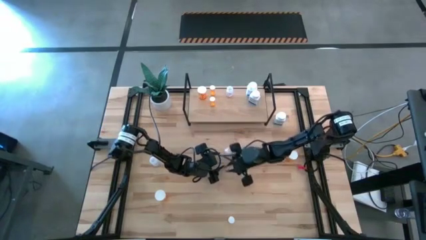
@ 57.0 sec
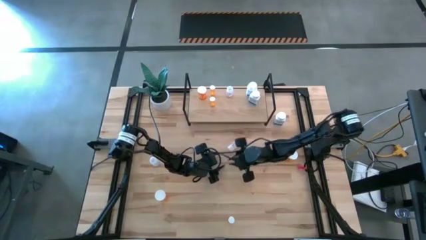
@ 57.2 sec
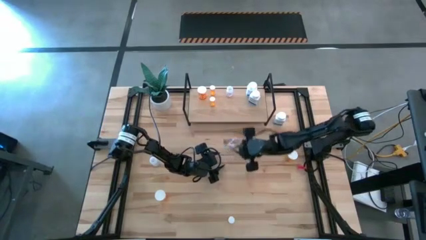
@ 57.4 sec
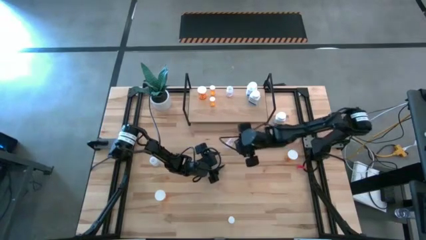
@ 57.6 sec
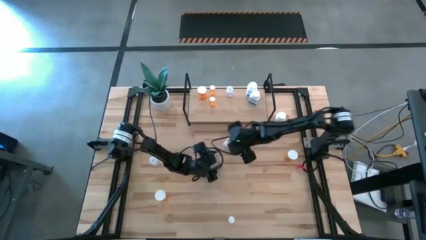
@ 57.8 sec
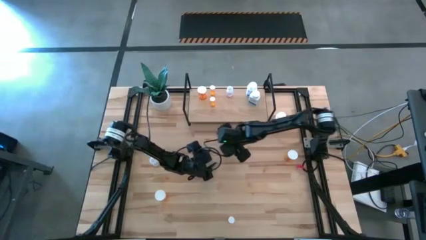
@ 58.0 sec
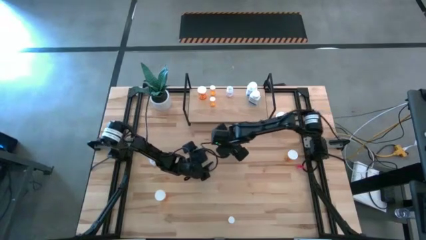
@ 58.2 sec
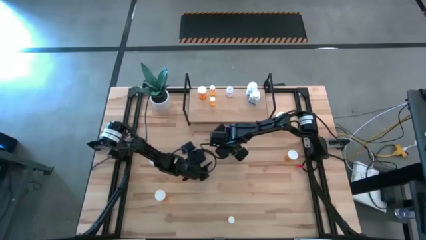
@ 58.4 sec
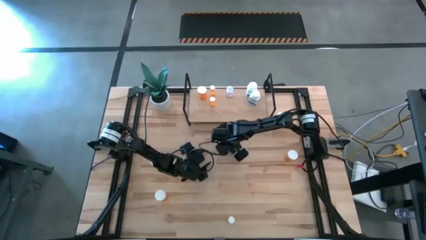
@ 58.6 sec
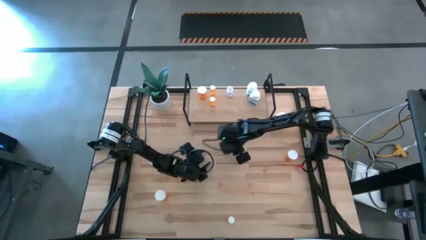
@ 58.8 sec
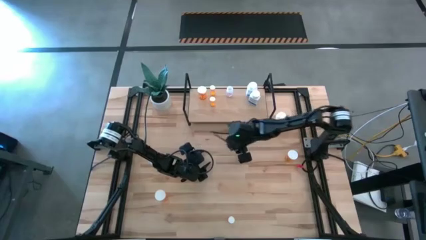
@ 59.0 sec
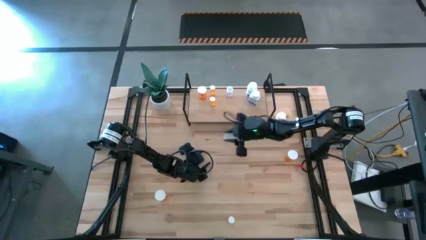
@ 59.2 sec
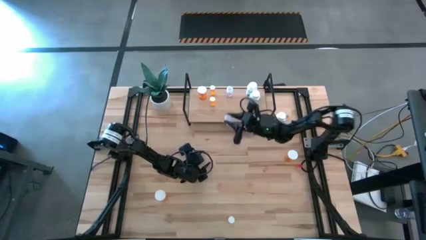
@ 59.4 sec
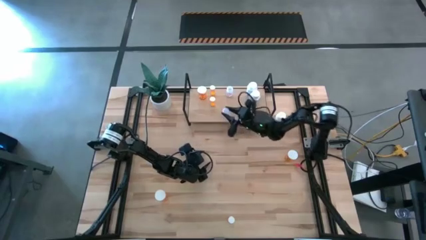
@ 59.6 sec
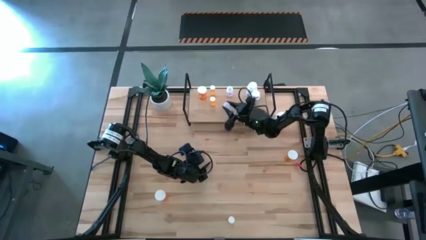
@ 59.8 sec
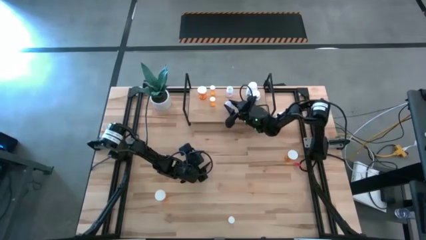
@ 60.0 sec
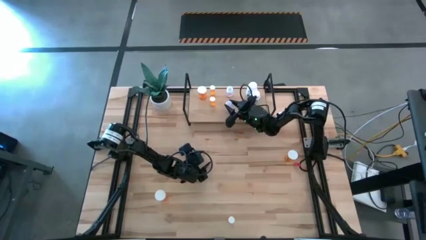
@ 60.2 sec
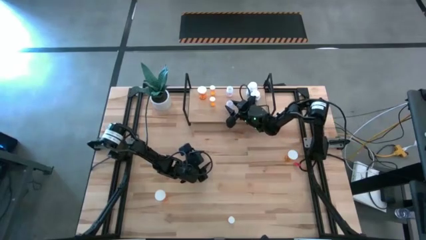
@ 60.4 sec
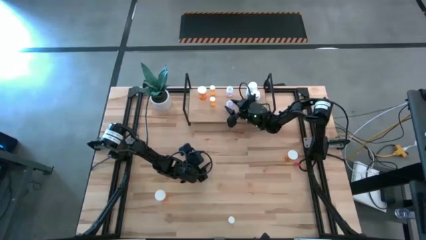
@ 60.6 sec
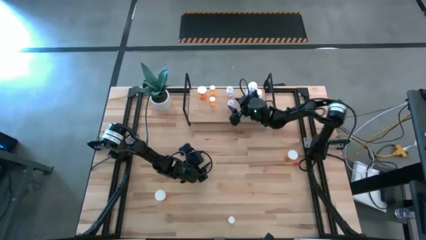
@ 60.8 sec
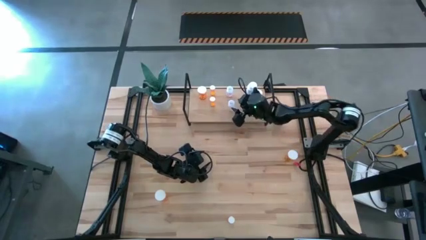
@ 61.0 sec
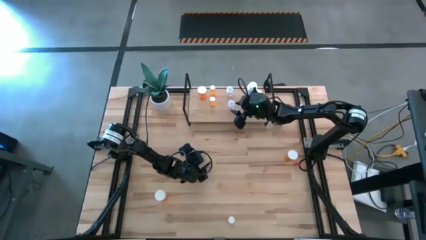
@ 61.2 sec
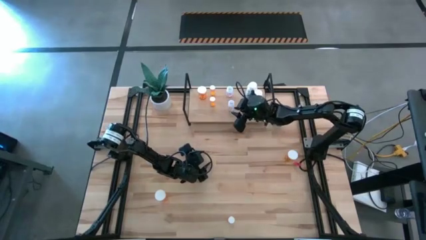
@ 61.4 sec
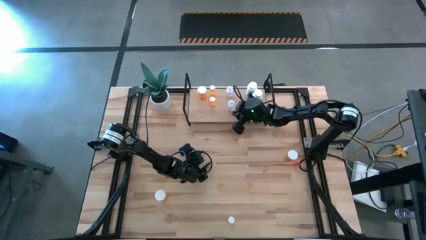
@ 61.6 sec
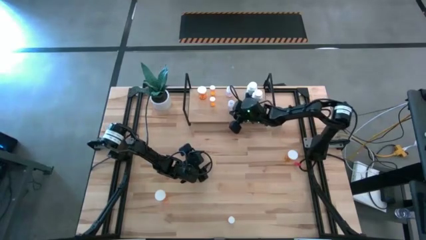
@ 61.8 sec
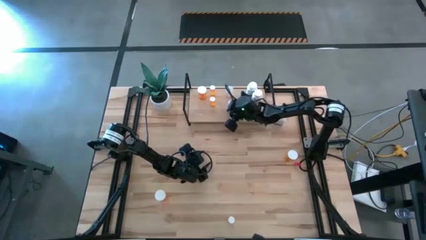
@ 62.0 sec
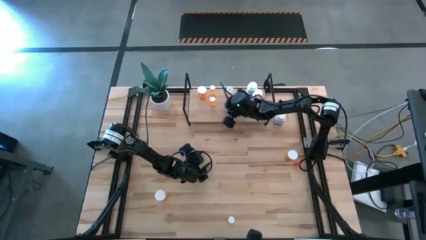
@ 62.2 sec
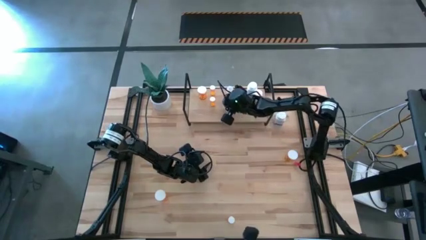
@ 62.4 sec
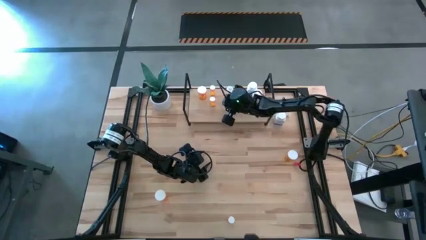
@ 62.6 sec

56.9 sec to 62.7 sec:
Task: Pick and place medicine bottles onto shelf by color
Put the bottom transparent pill bottle on the shelf aligned with the transparent pill bottle

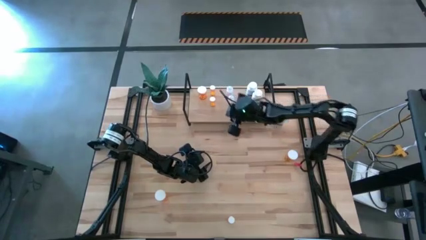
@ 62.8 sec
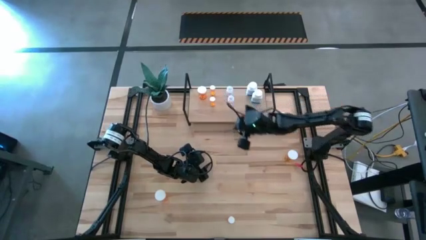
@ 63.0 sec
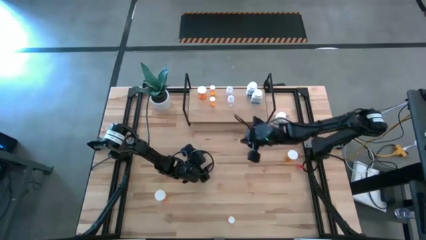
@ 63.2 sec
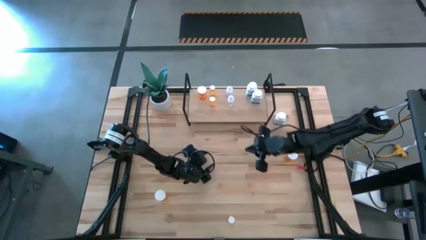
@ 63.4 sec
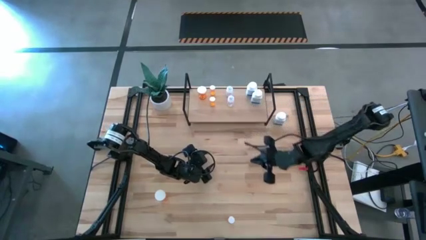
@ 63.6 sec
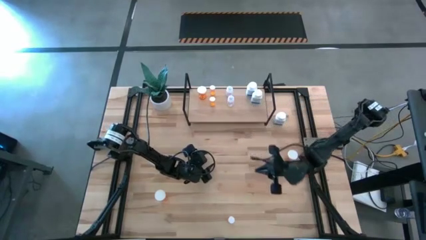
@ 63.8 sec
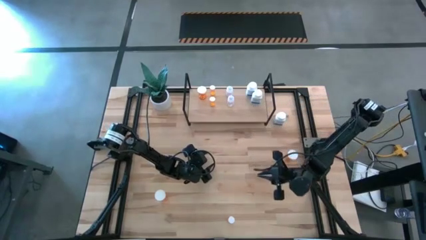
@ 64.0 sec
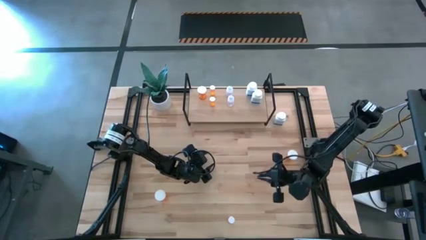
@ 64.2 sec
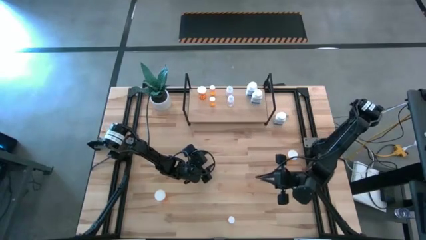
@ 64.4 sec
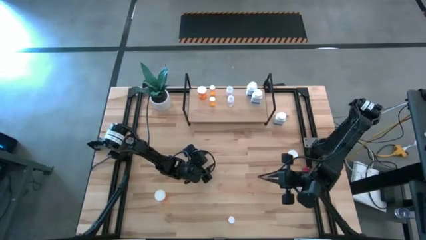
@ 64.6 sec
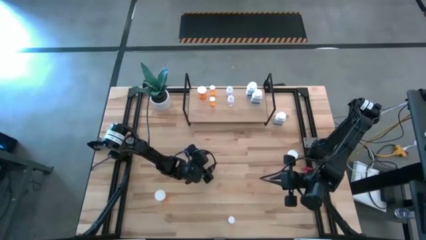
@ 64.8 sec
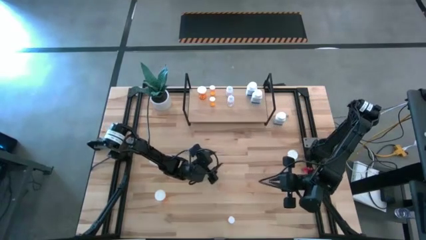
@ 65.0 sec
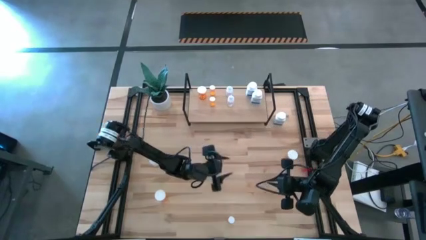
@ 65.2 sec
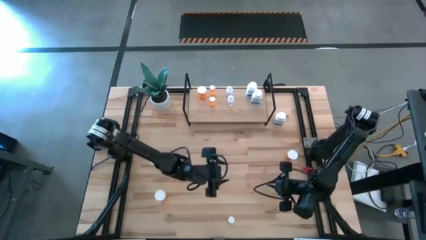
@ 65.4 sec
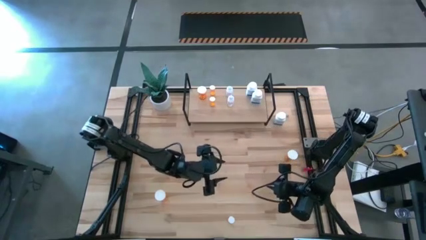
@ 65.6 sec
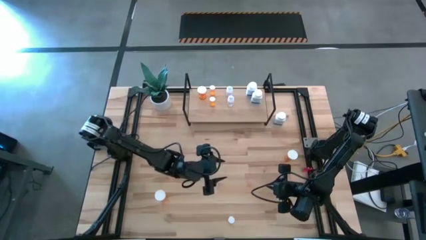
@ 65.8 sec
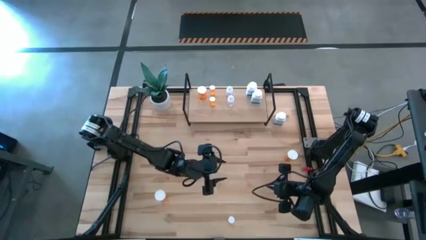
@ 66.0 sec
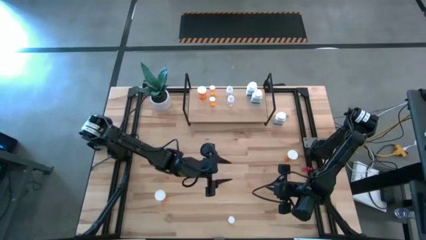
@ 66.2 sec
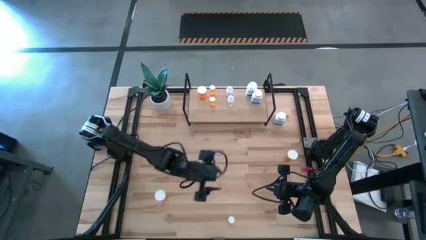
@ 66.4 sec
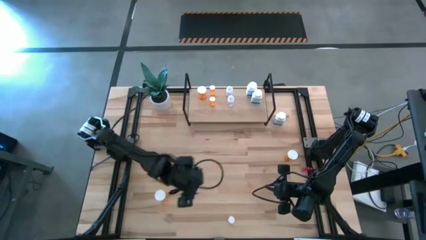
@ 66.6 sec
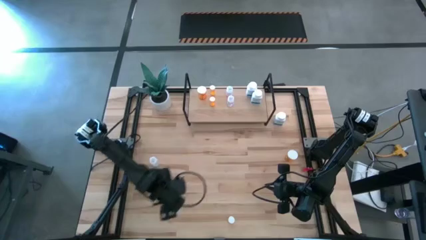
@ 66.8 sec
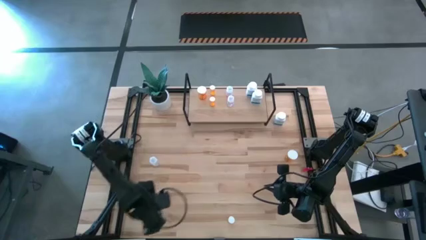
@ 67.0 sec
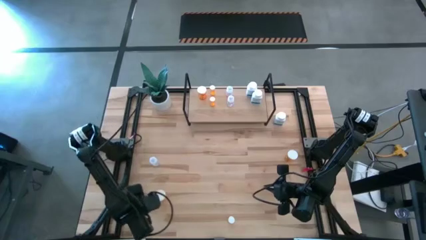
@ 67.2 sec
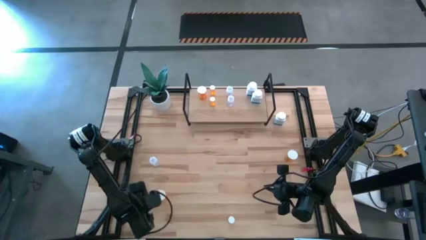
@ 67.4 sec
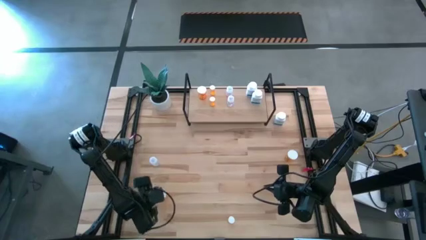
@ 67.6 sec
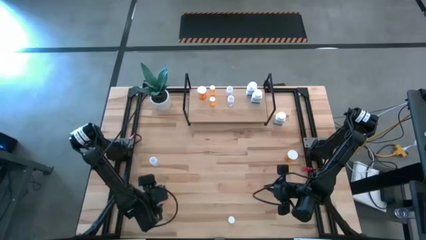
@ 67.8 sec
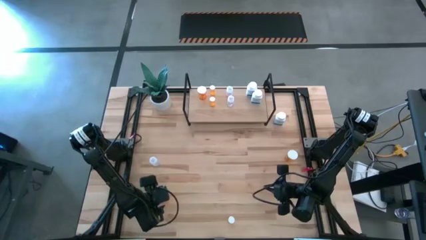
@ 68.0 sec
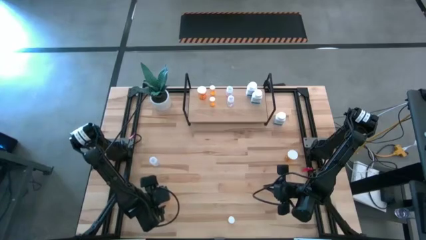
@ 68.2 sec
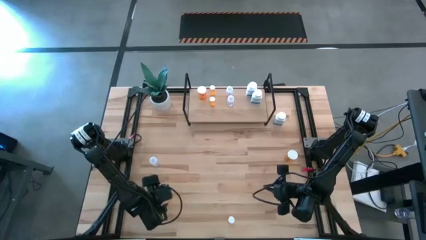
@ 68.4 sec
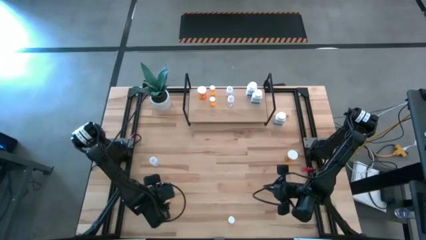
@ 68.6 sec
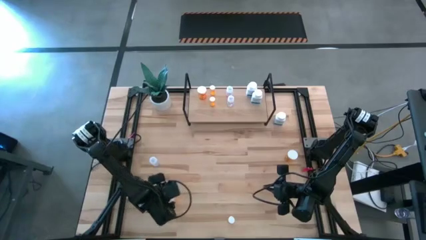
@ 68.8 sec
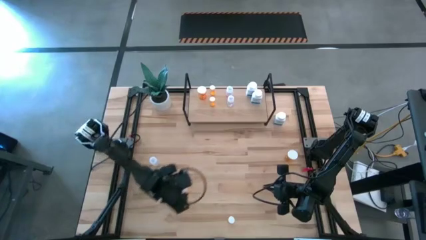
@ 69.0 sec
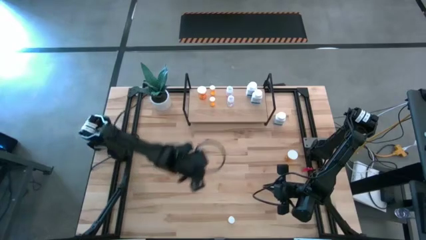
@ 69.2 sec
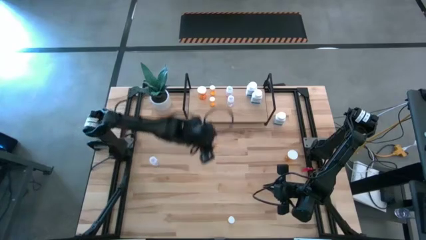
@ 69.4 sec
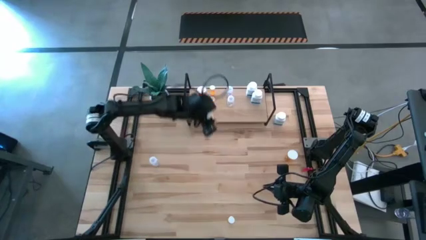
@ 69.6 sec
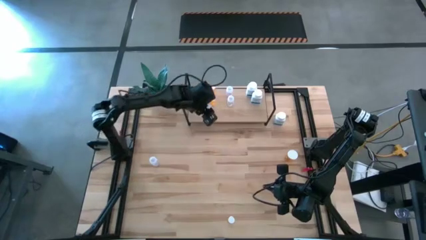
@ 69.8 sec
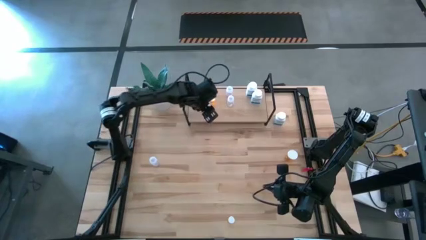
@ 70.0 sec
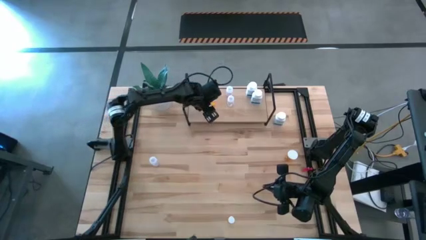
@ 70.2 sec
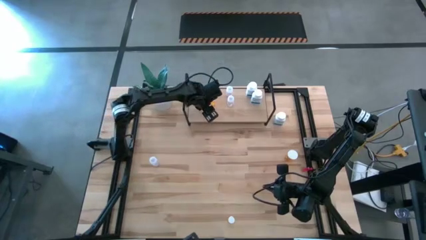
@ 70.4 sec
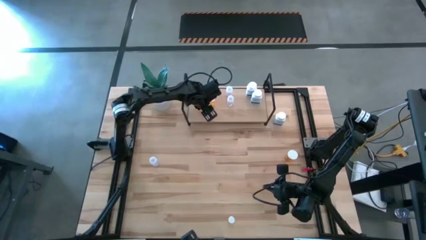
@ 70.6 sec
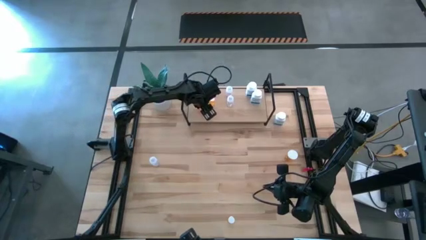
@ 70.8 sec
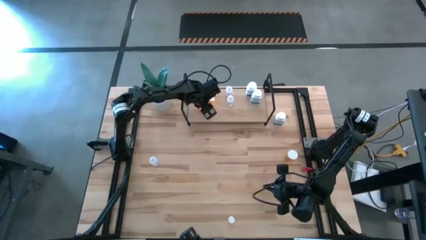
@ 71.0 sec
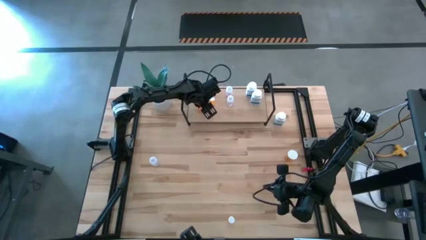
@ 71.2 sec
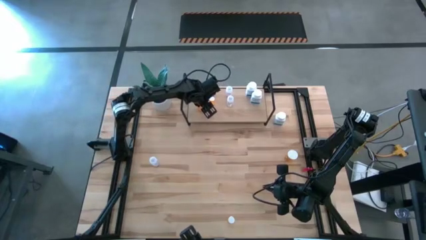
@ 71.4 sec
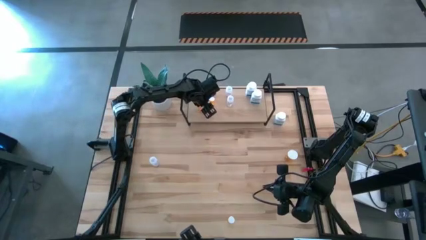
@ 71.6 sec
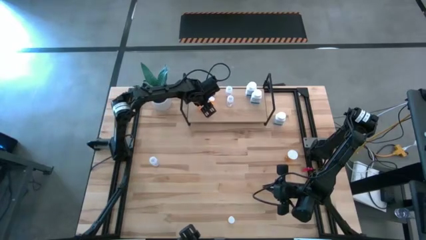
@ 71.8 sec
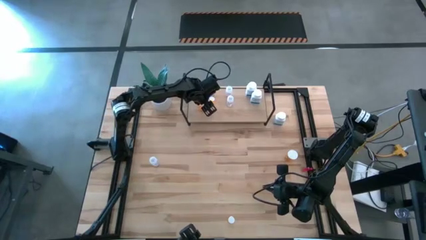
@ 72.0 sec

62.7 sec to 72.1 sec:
Put the left large orange pill bottle on the shelf aligned with the large orange pill bottle

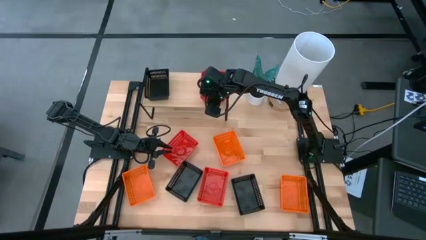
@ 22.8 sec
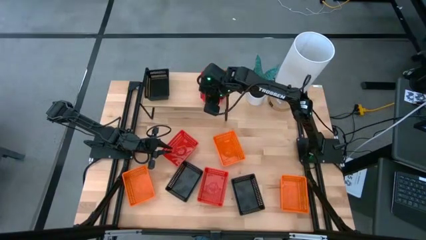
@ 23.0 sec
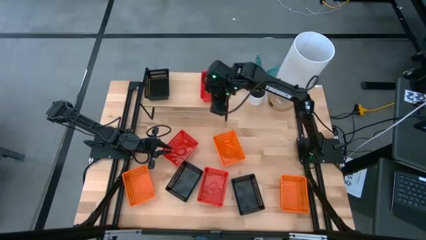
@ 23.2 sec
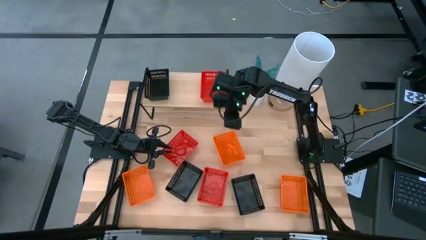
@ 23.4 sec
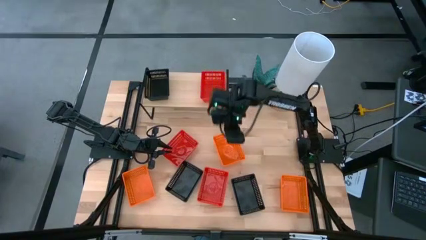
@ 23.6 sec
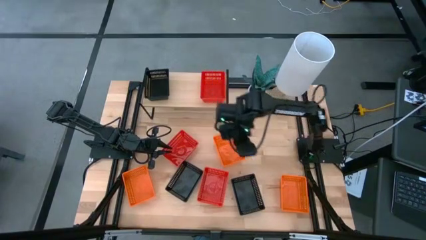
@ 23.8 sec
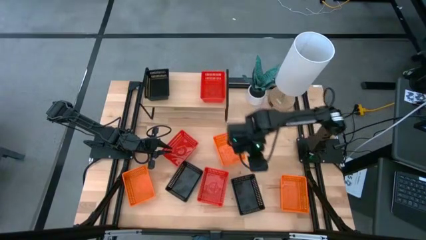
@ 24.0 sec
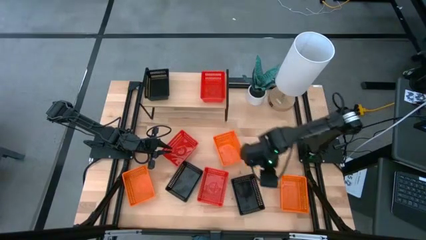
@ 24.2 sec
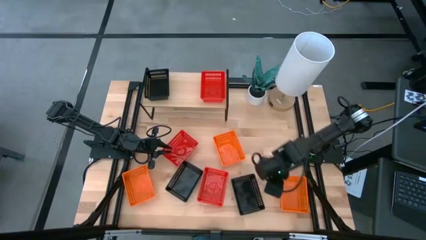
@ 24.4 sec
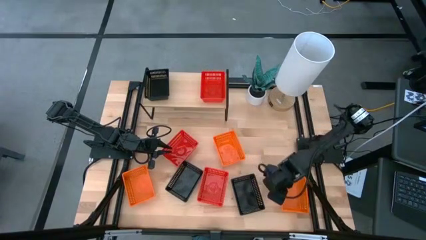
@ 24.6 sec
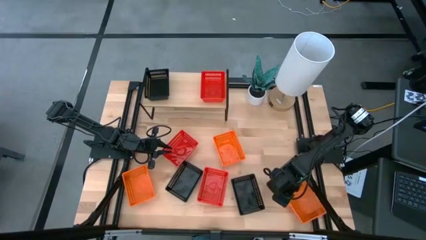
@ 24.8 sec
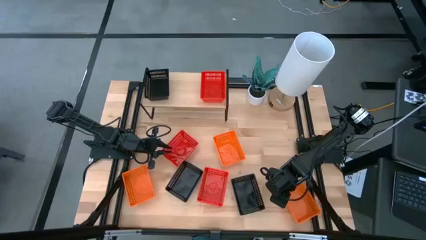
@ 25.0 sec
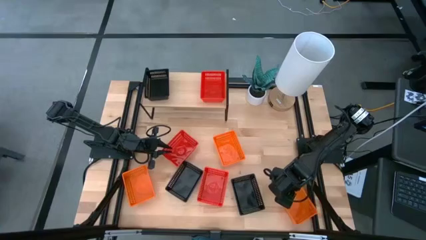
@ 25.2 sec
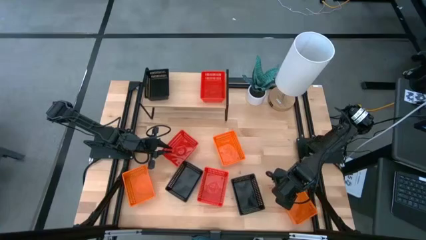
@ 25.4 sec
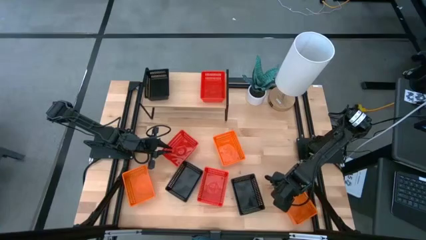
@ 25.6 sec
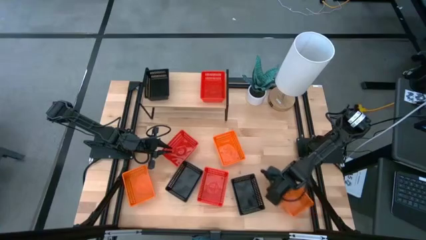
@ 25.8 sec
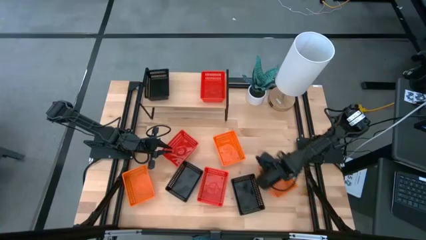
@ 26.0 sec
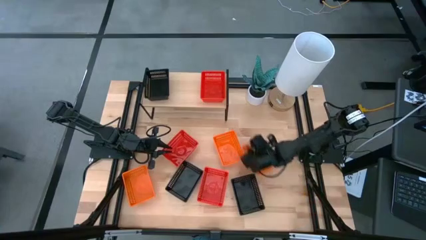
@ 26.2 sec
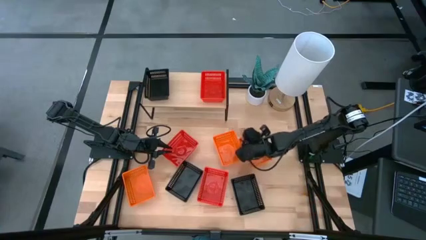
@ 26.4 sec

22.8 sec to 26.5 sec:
Task: Stack baskets on shelf by color
Move the bottom right orange bin to the middle right of the table
